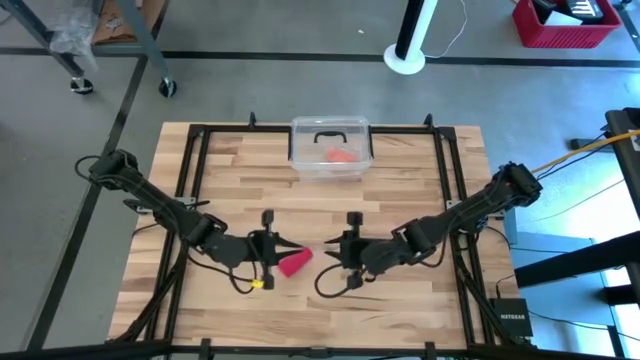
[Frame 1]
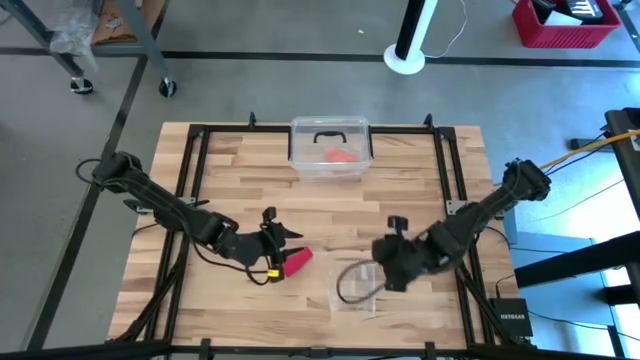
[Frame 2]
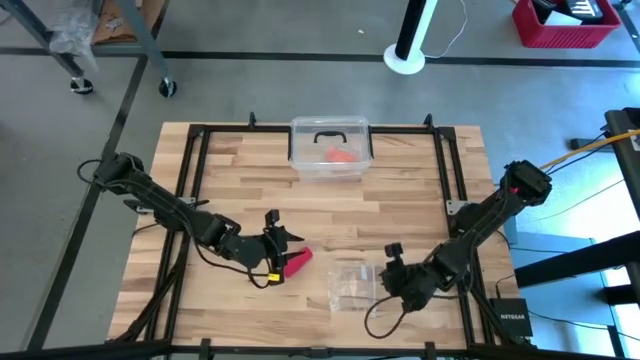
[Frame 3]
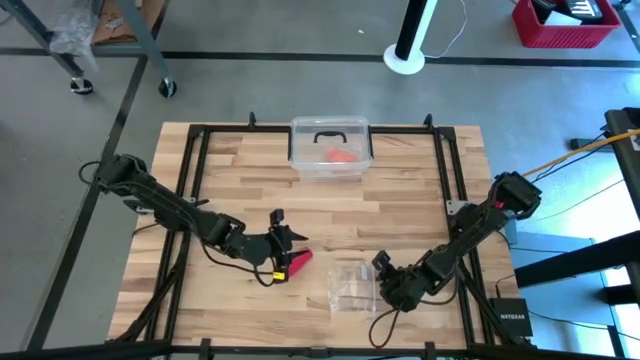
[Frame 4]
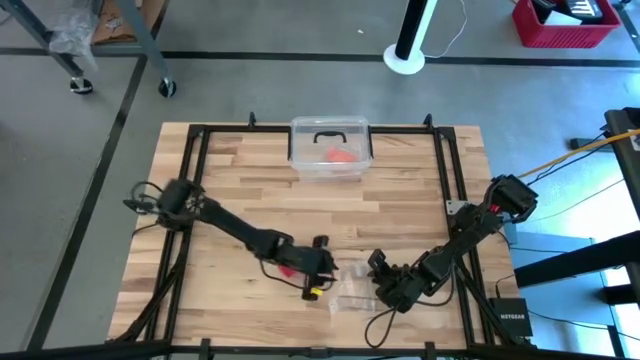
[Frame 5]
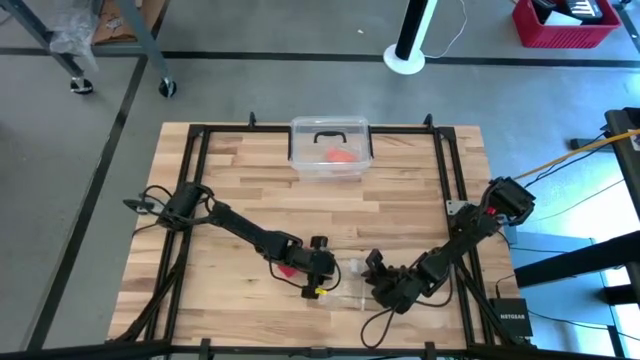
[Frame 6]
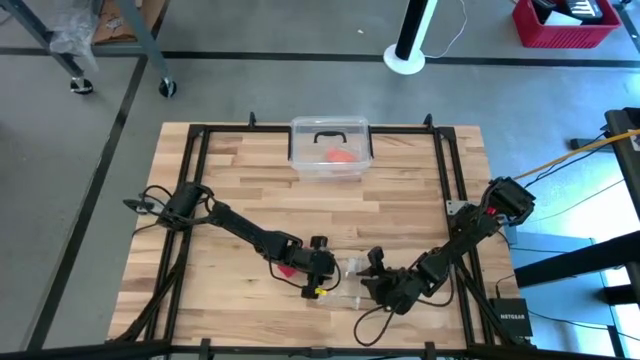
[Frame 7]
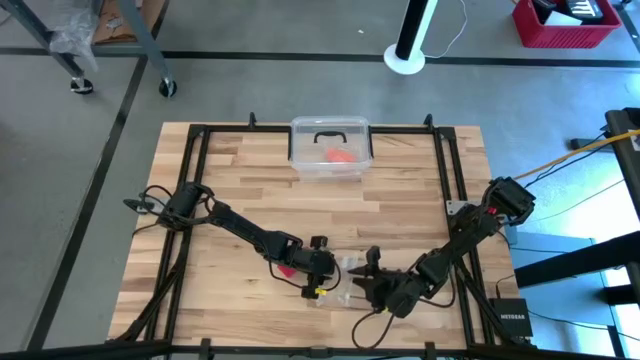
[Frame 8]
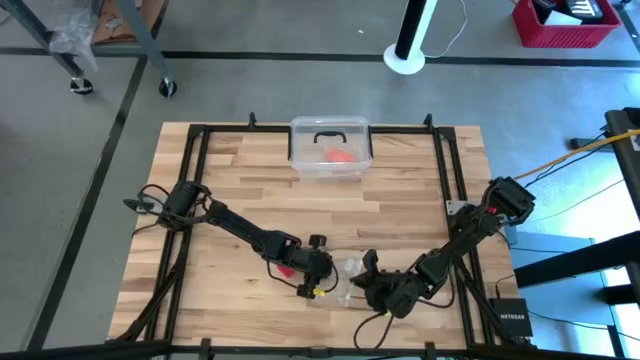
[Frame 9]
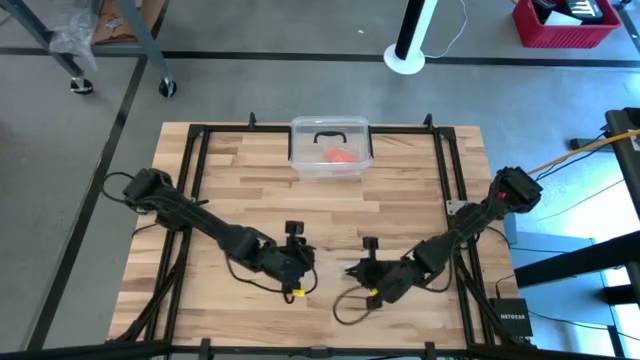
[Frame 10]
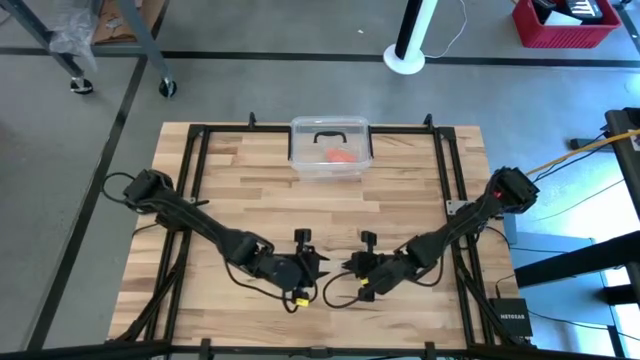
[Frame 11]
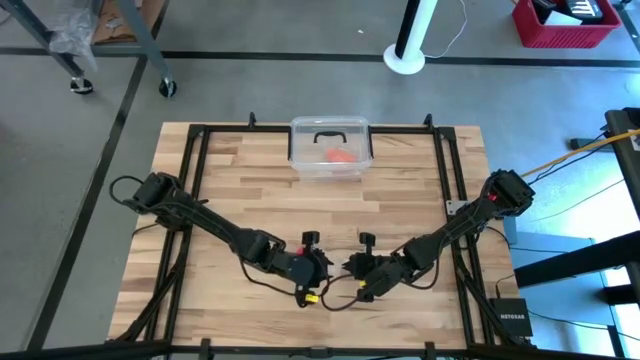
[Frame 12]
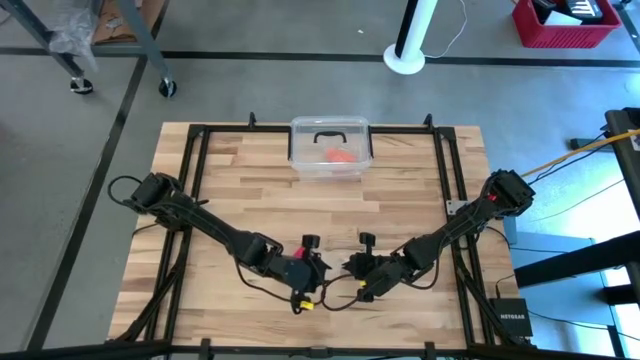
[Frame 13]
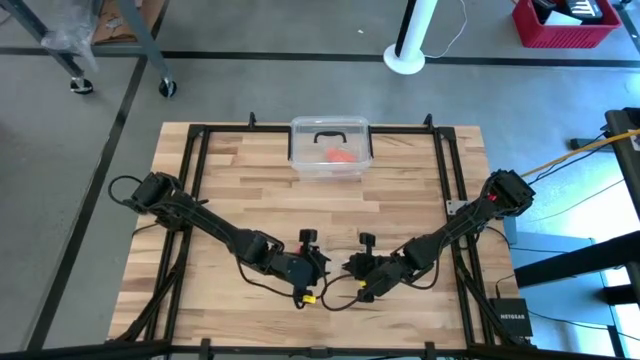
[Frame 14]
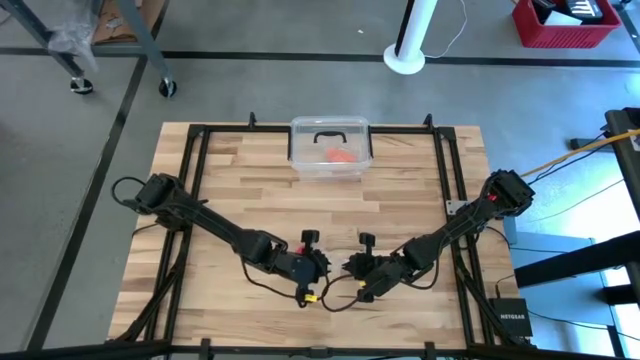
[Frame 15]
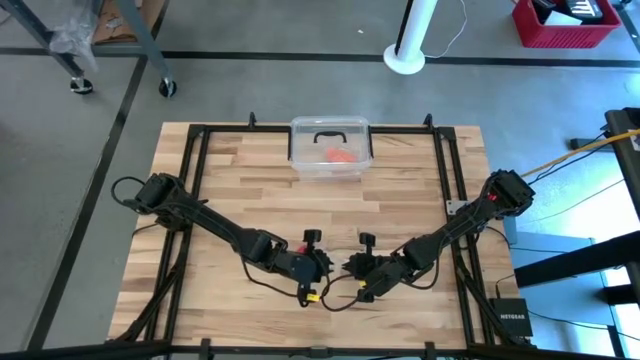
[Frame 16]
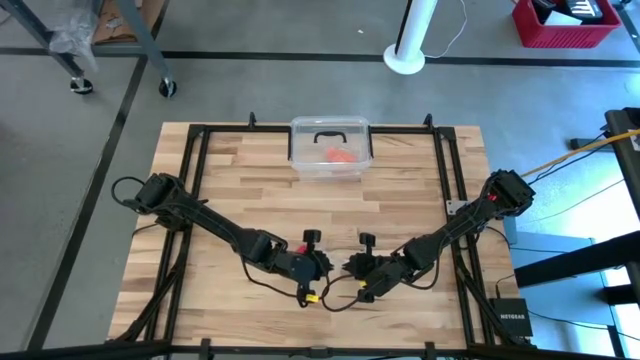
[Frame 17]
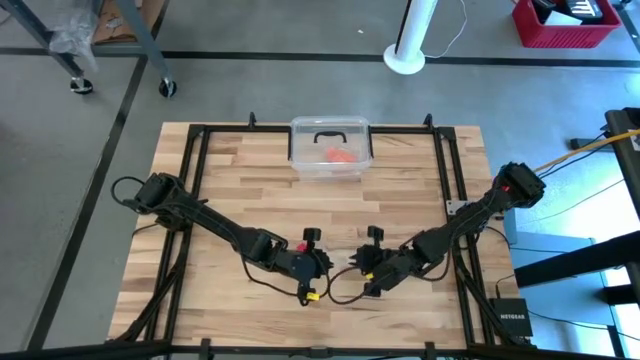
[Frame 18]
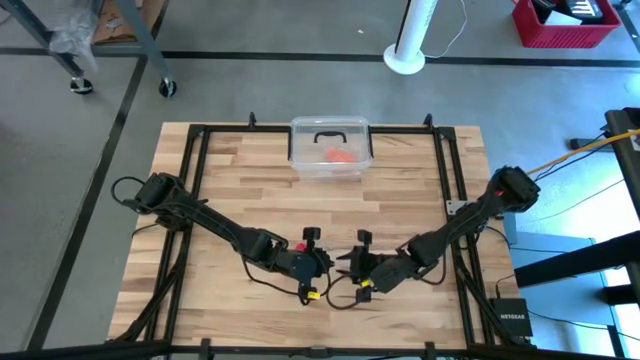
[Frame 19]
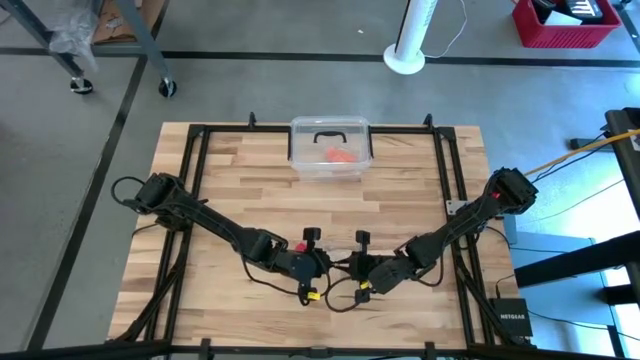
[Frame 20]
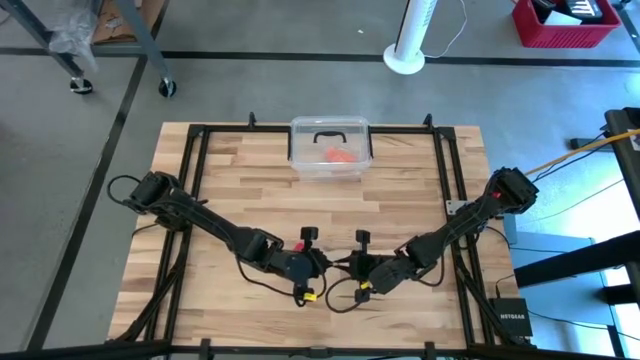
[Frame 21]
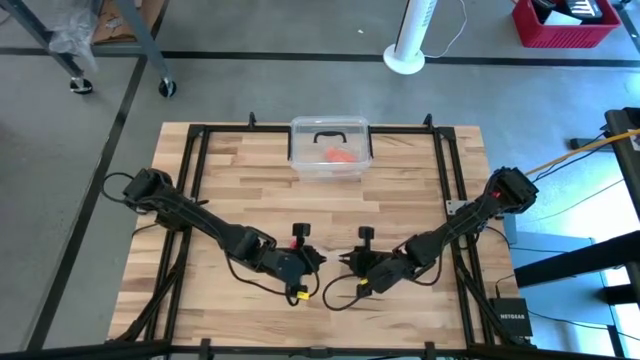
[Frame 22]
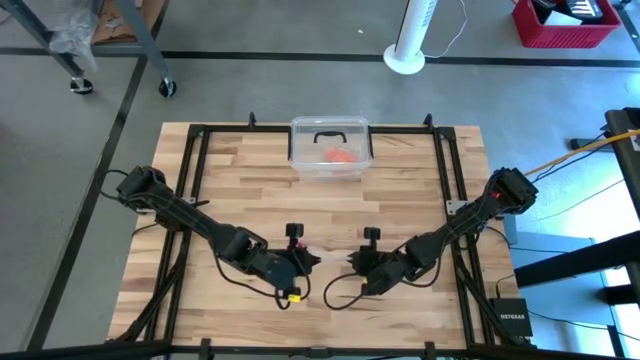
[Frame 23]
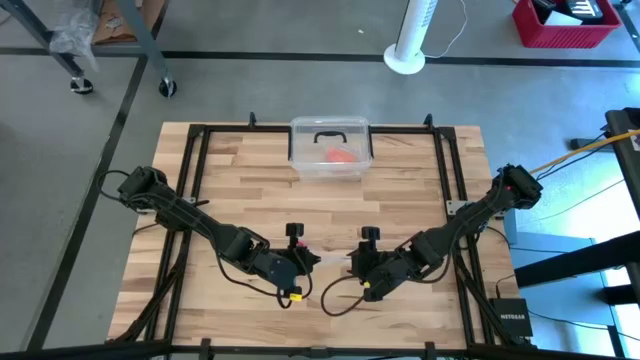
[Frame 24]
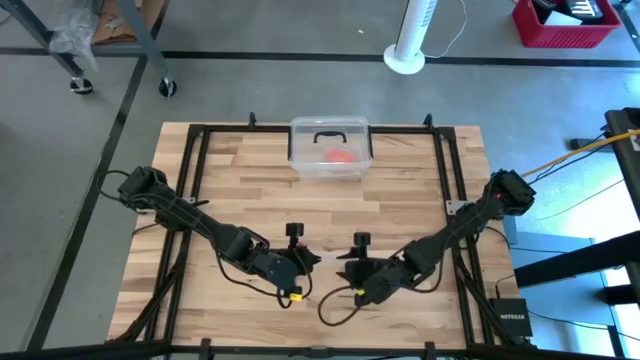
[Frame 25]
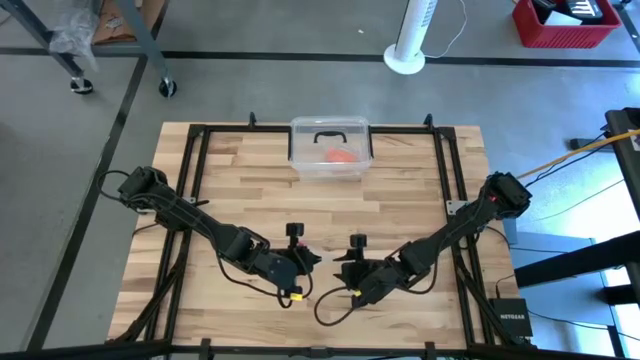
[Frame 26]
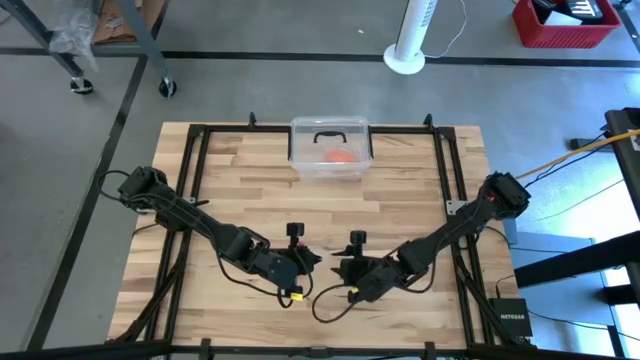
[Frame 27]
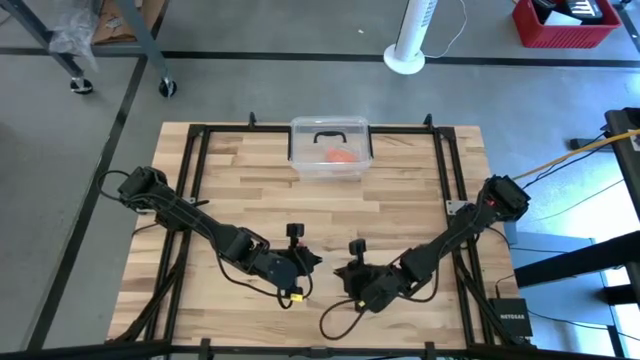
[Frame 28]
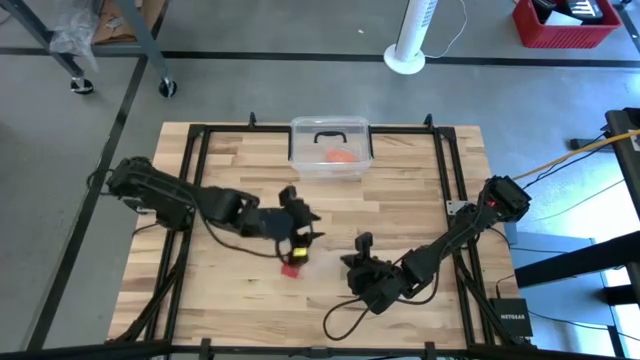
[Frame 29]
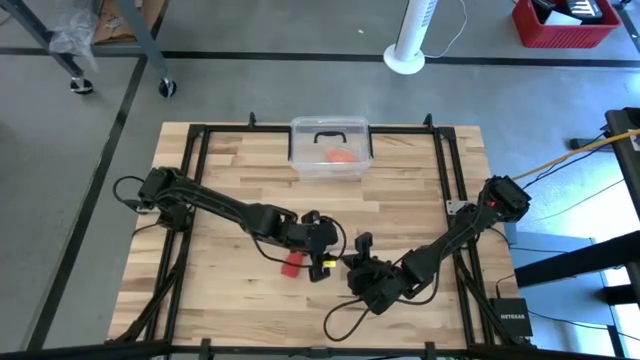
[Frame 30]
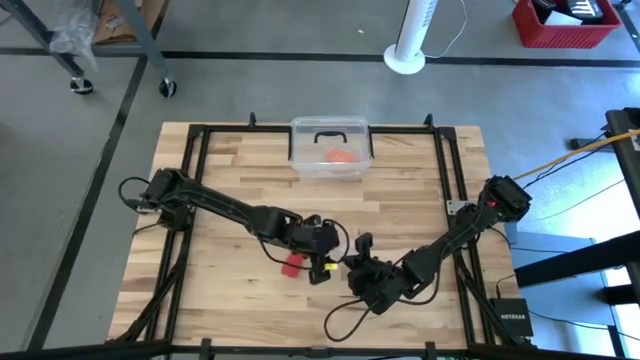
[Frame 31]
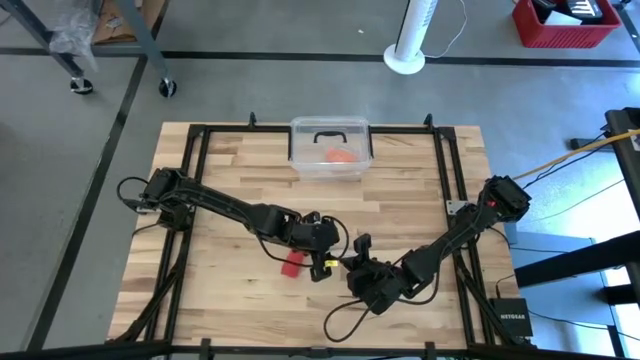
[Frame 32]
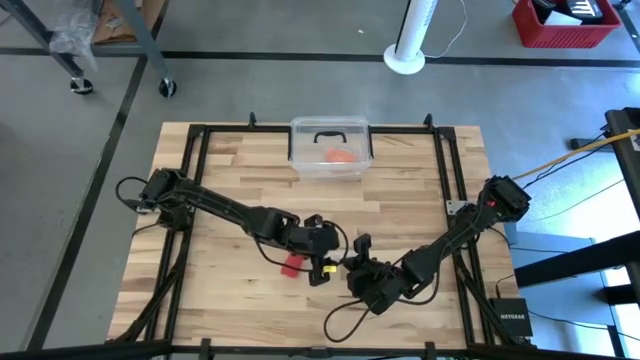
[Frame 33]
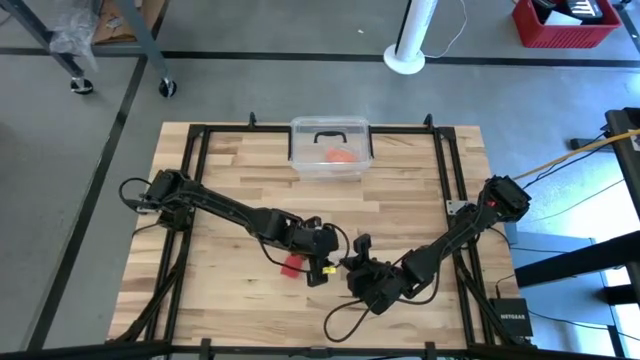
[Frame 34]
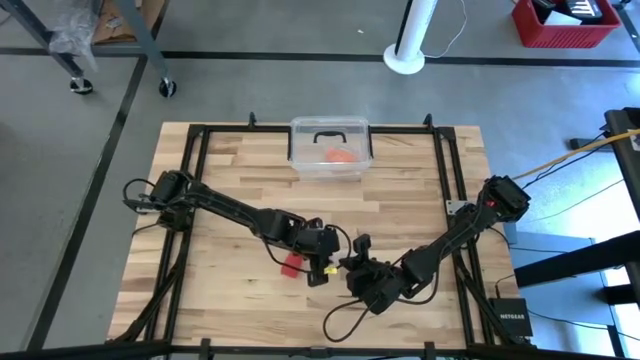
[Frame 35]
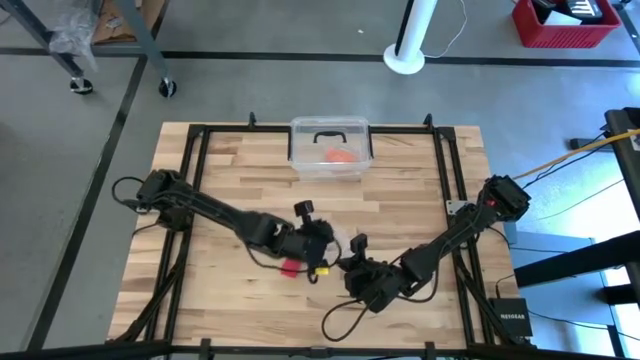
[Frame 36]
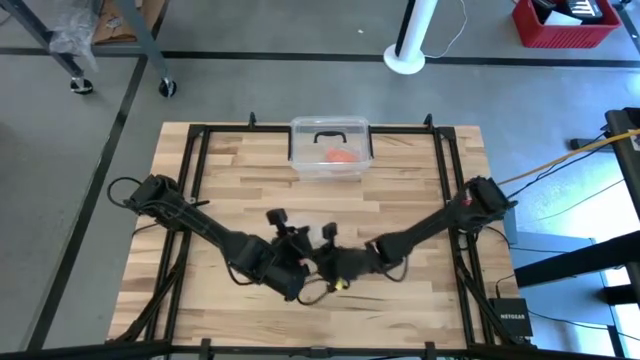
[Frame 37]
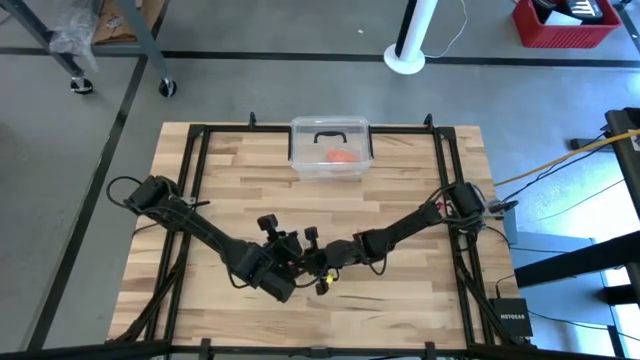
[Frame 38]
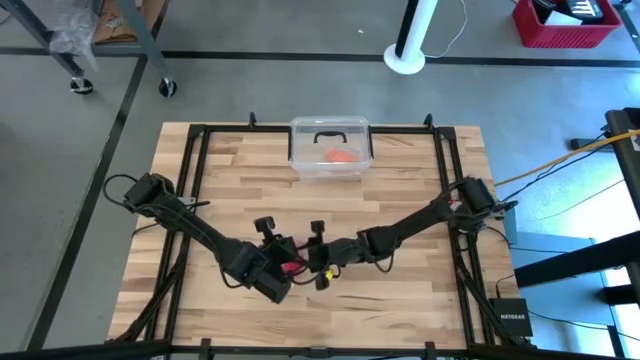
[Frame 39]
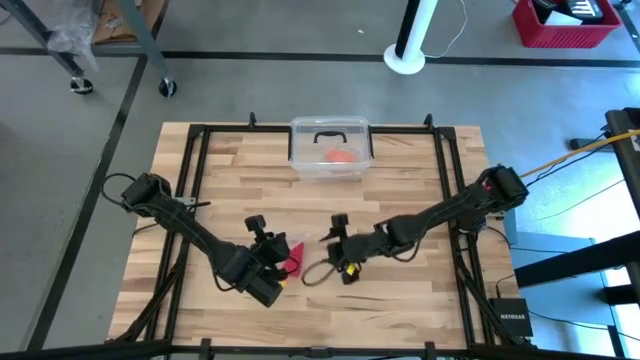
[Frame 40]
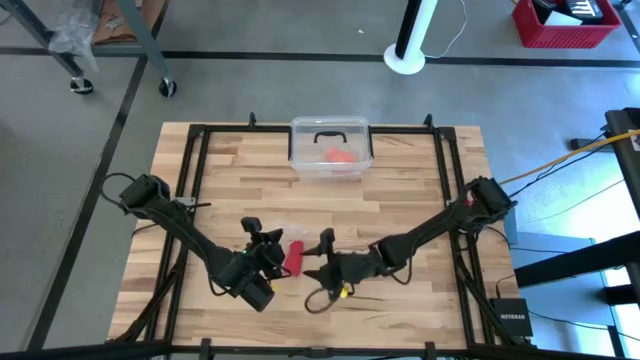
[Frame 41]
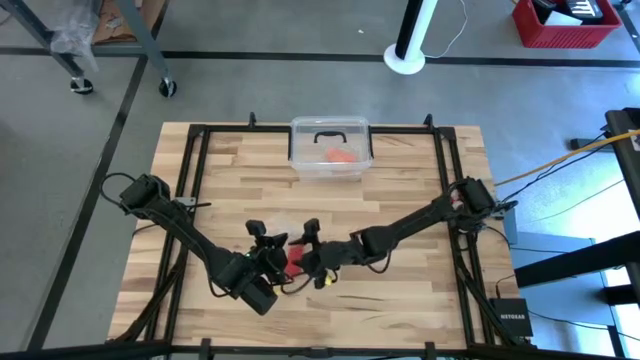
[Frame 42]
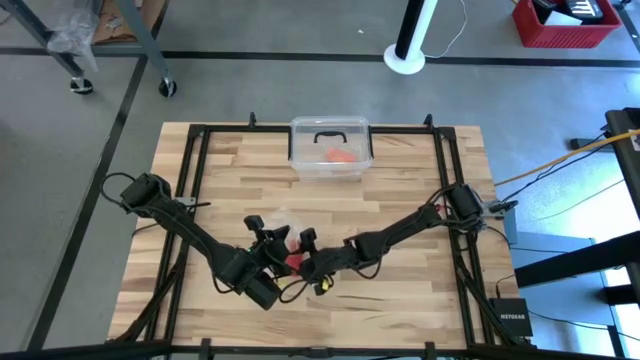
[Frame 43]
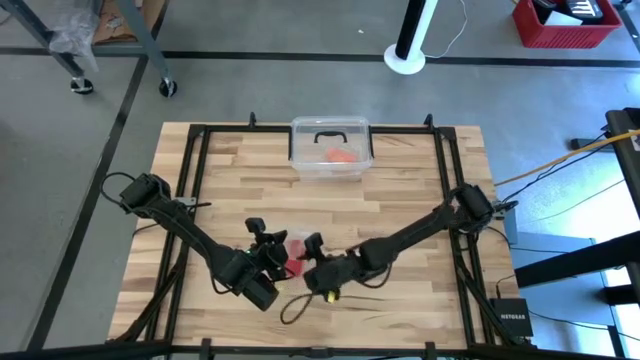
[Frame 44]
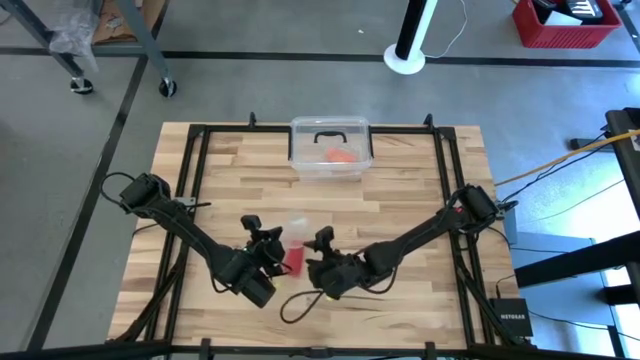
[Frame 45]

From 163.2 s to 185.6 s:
Task: Roll bandage
Open the transparent zip bag
